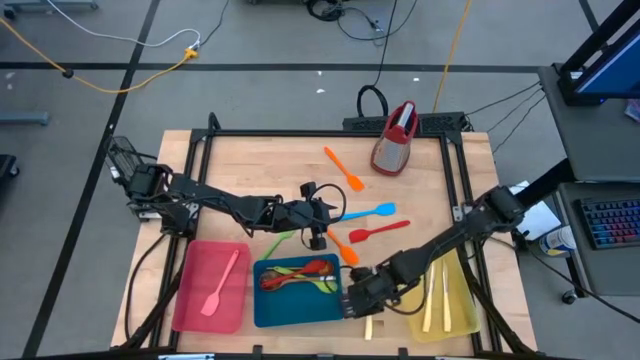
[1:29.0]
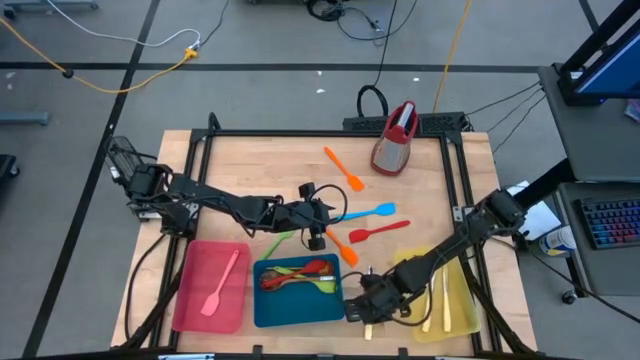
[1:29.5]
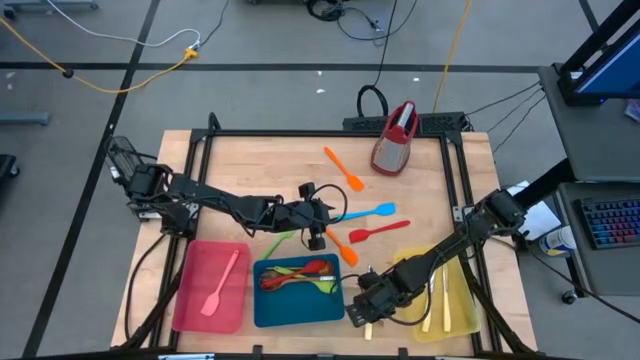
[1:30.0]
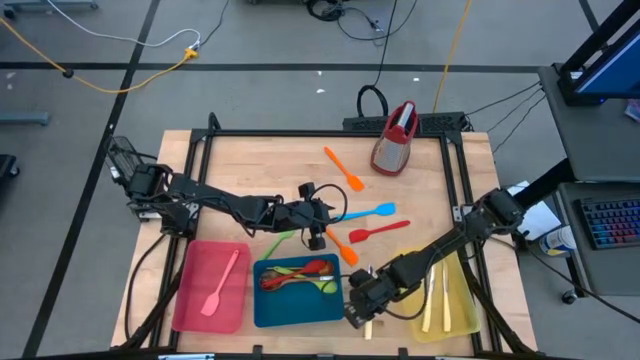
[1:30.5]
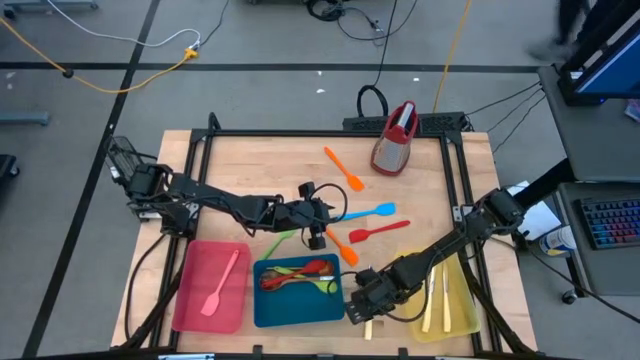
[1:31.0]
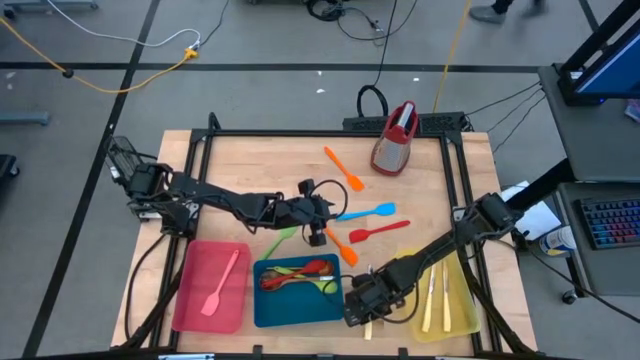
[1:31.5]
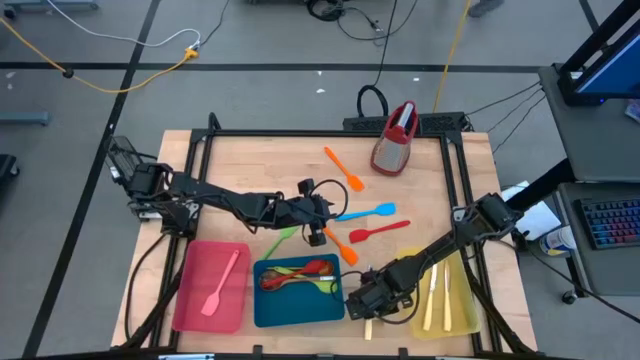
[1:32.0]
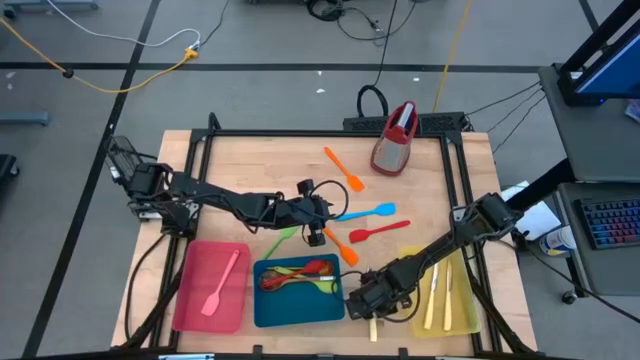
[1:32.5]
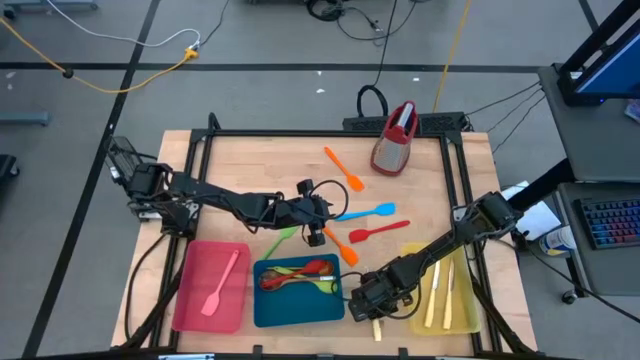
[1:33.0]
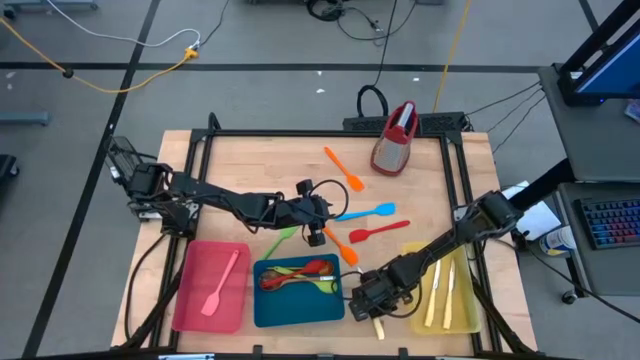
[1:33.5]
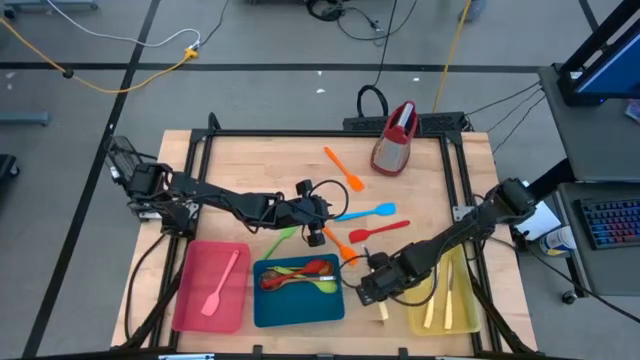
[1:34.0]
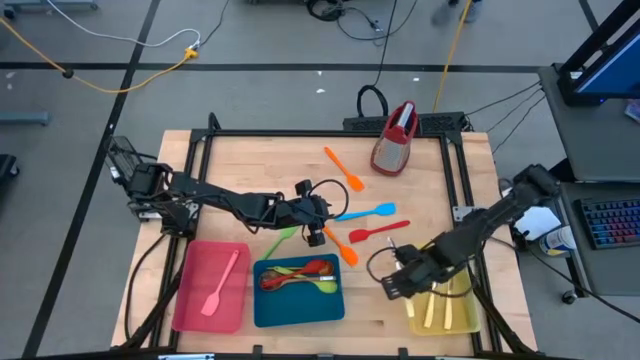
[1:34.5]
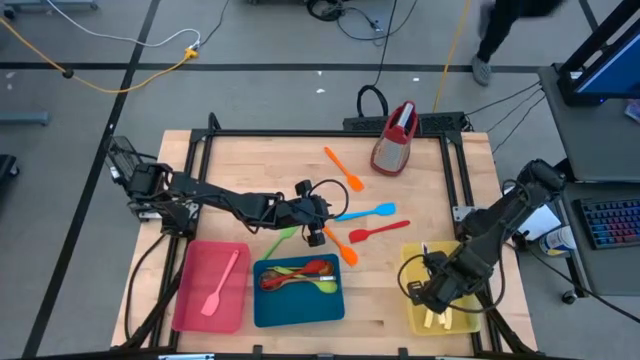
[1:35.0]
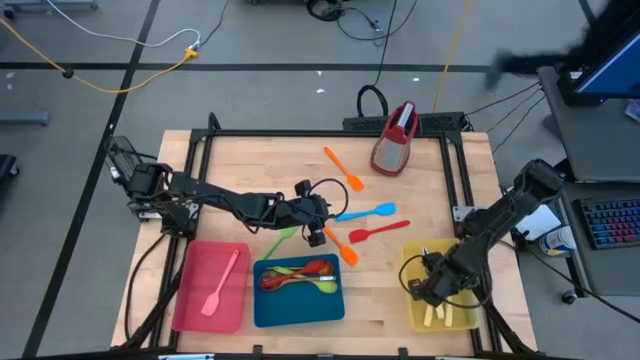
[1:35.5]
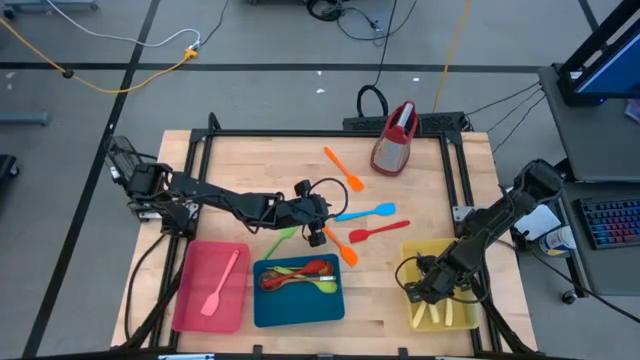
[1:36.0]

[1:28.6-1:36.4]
Task: Pick & Place Kitchen Items
Put the yellow table knife into the yellow bin

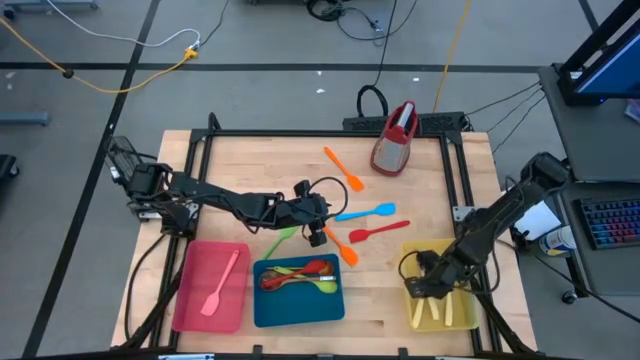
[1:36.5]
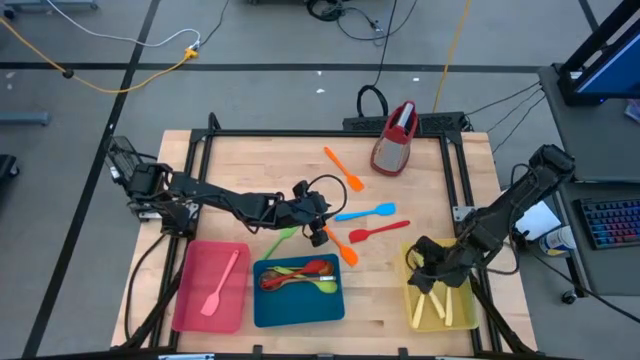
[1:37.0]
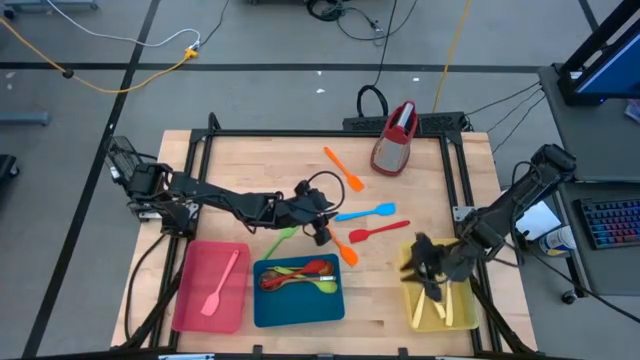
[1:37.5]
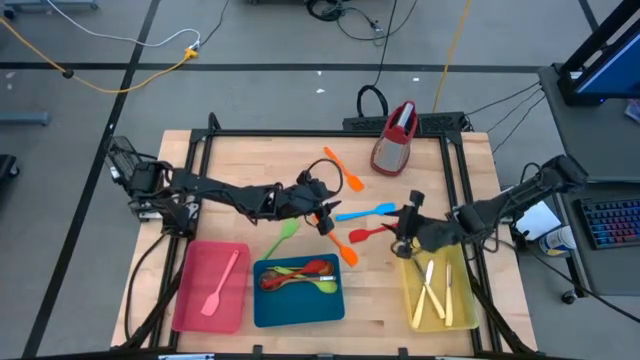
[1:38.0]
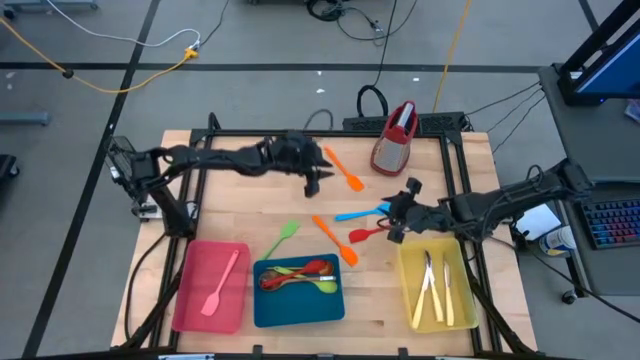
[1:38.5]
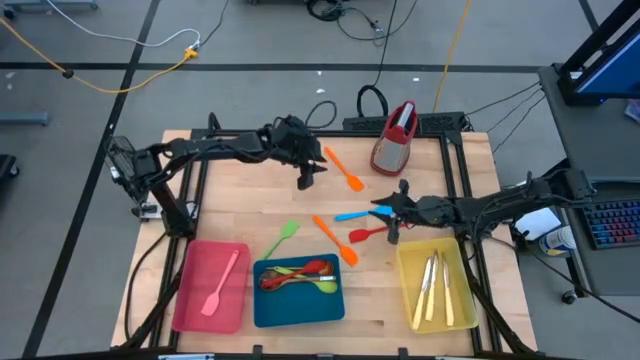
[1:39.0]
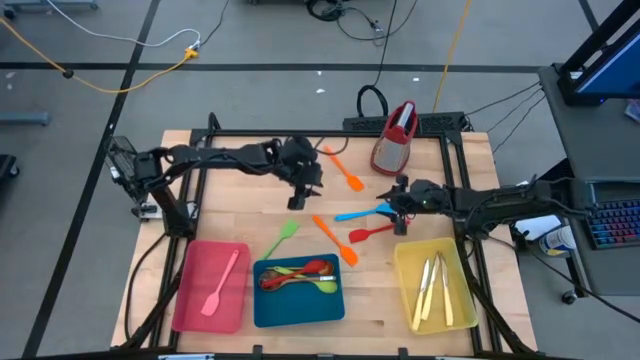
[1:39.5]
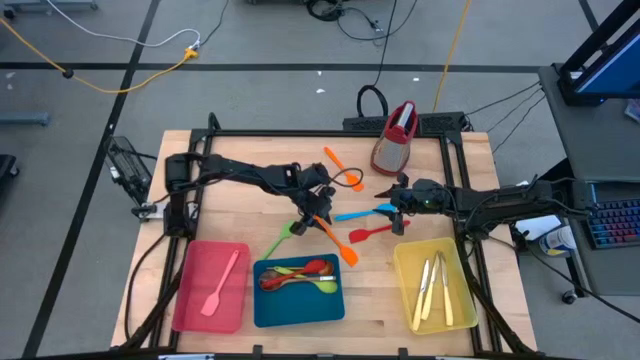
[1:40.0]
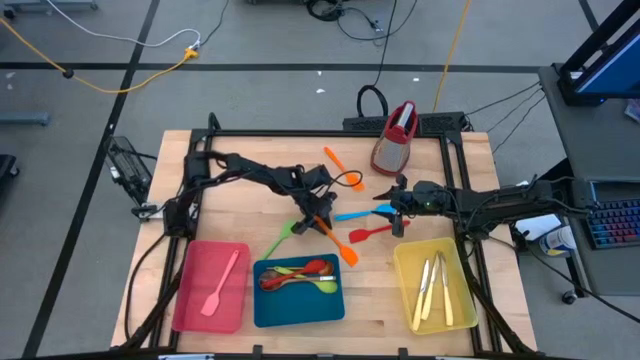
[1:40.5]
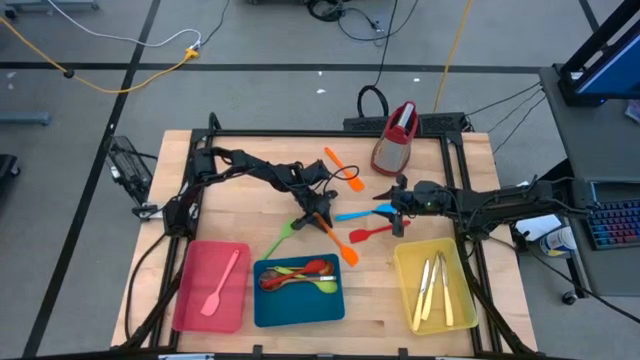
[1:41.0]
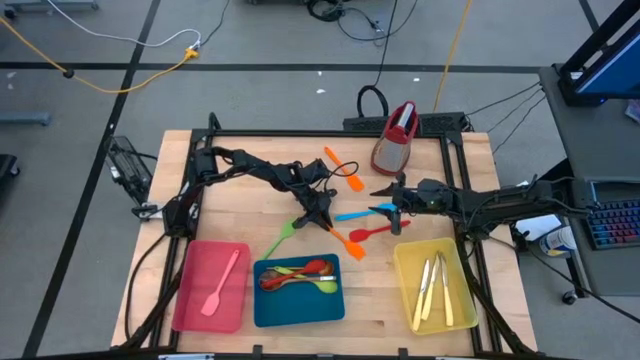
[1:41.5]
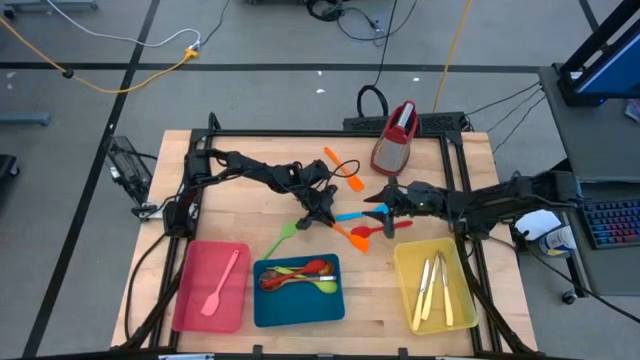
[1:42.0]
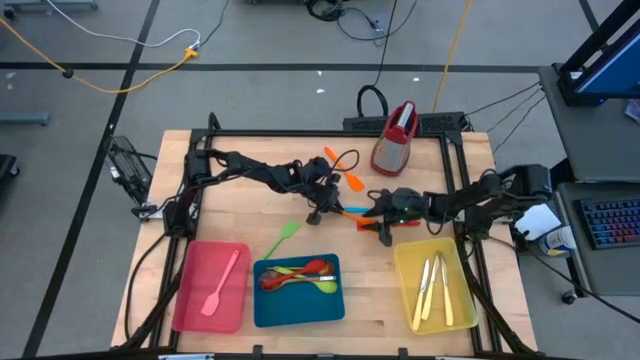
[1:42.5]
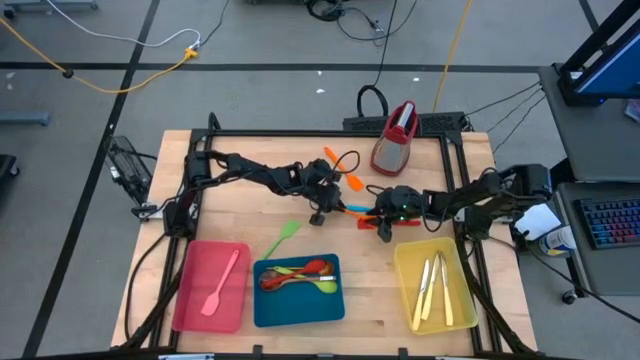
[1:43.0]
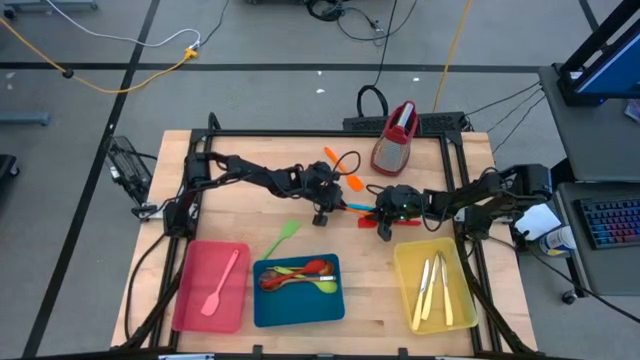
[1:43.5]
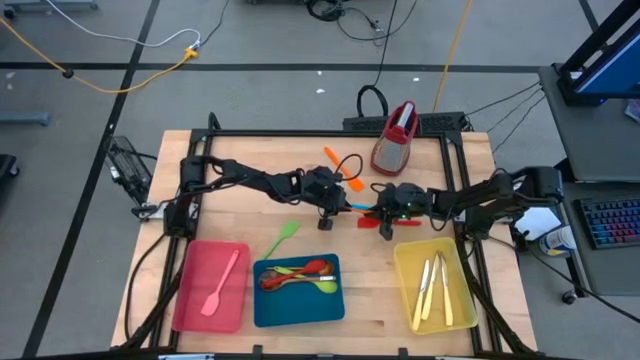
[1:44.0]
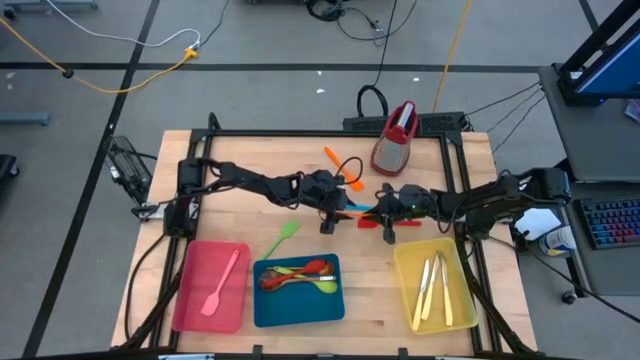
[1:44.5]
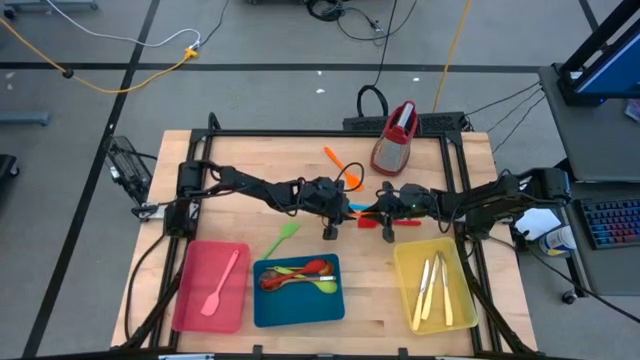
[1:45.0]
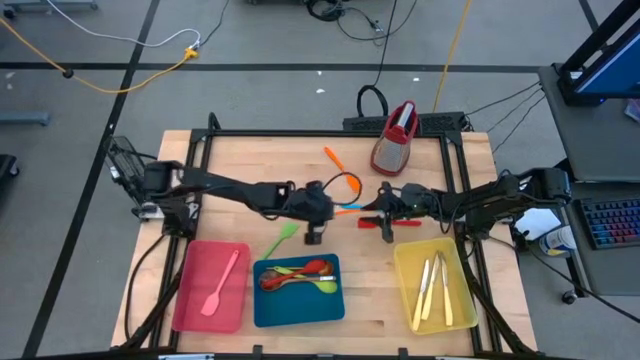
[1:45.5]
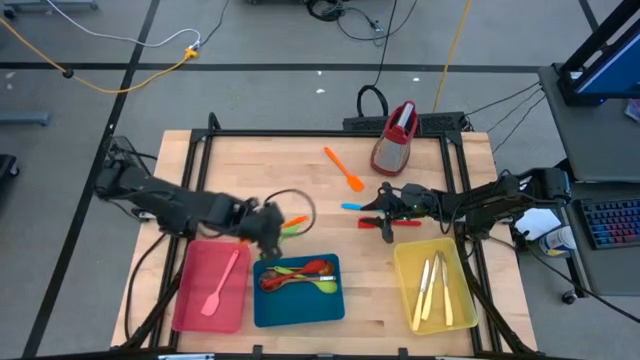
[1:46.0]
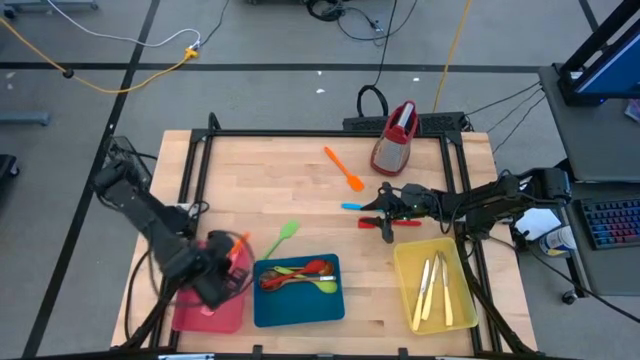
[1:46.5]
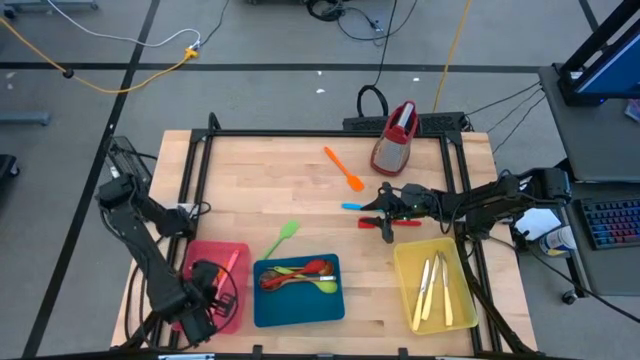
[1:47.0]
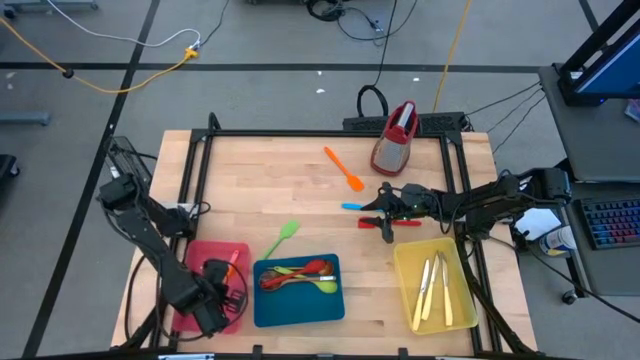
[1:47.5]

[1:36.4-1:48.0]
Put the orange spatula into the pink bin

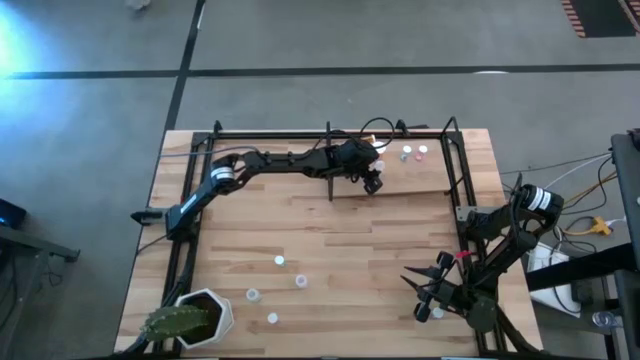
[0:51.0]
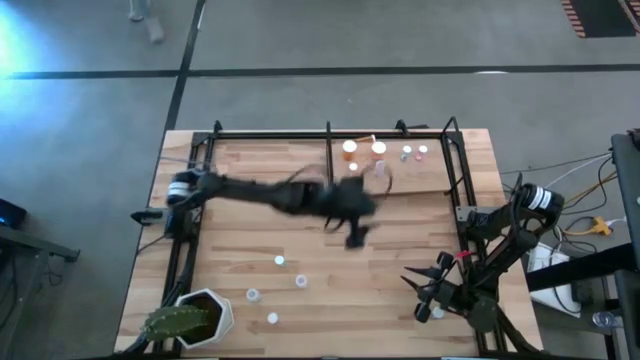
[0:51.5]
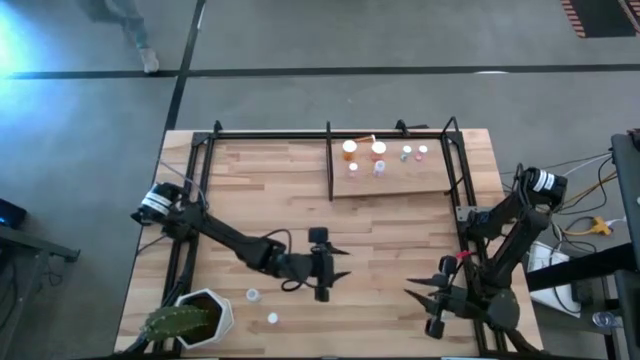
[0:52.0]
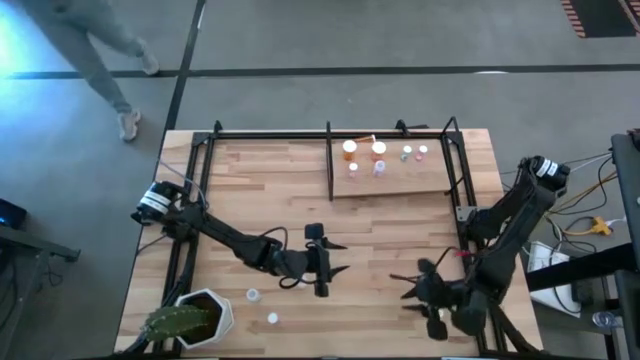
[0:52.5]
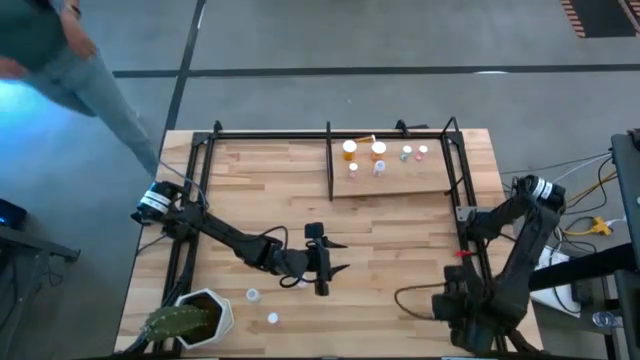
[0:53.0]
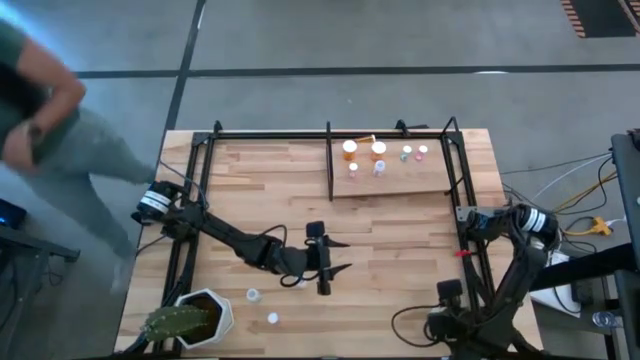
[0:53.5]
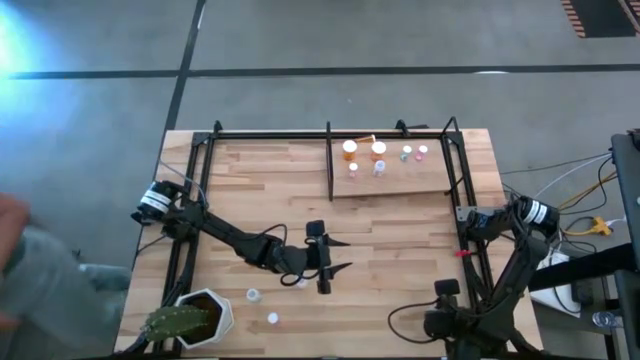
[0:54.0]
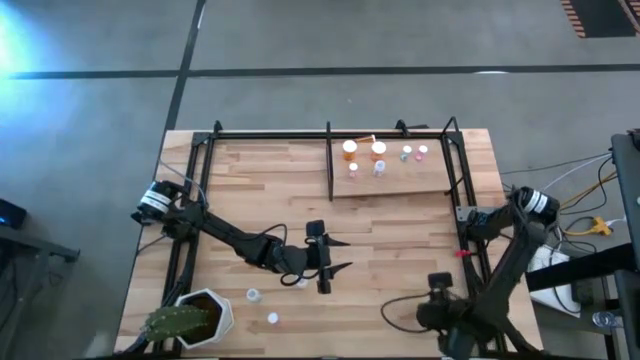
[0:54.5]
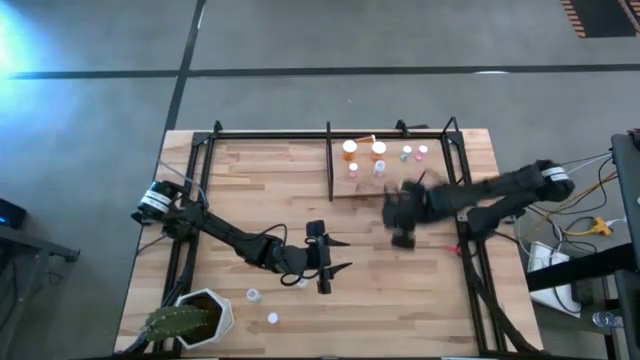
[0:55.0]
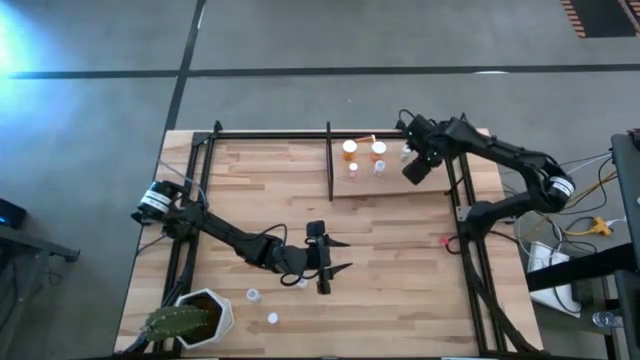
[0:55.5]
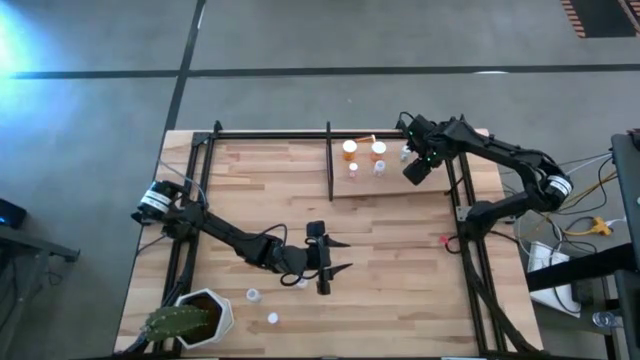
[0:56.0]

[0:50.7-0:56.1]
Task: Pick and place medicine bottles onto shelf by color
Put the bottom blue pill bottle on the shelf
